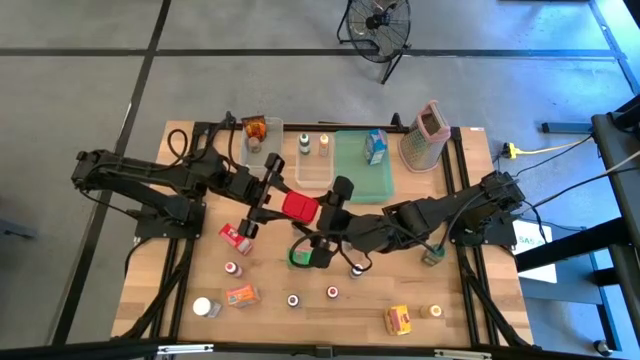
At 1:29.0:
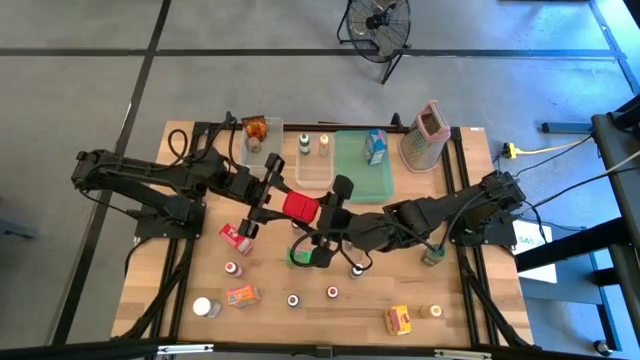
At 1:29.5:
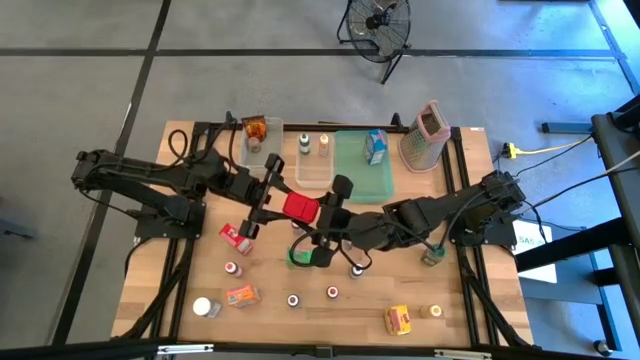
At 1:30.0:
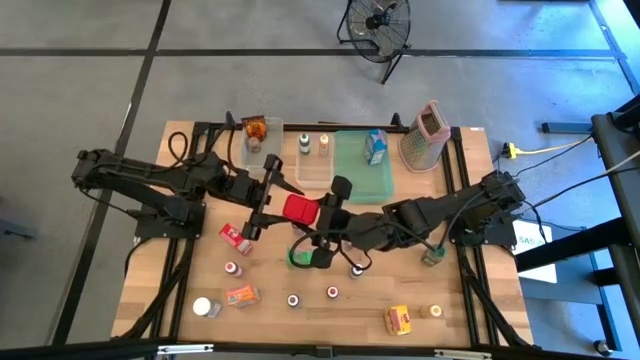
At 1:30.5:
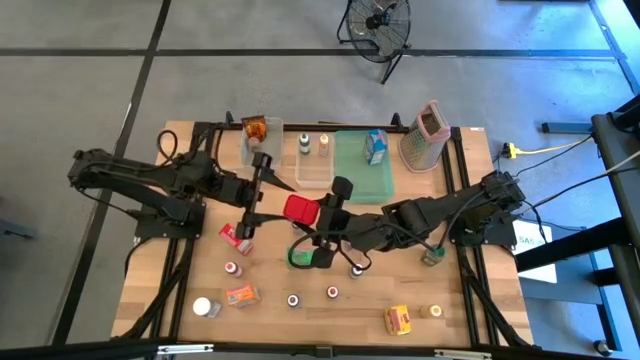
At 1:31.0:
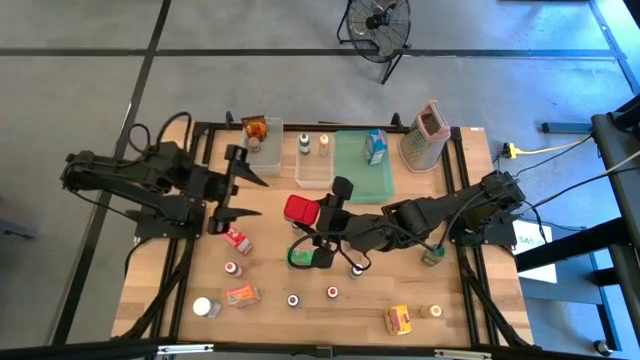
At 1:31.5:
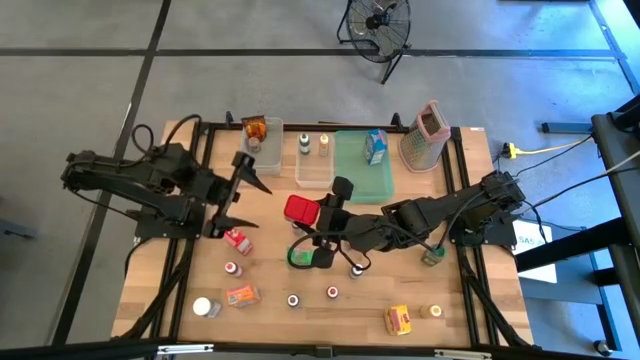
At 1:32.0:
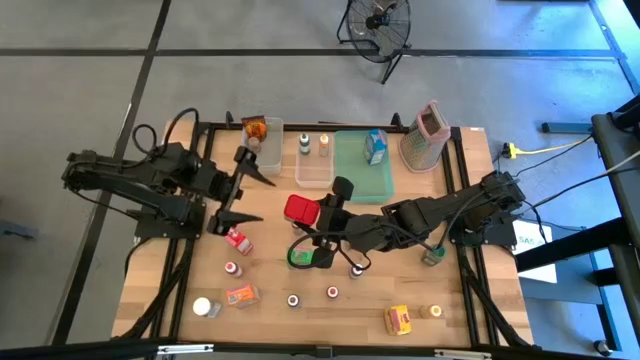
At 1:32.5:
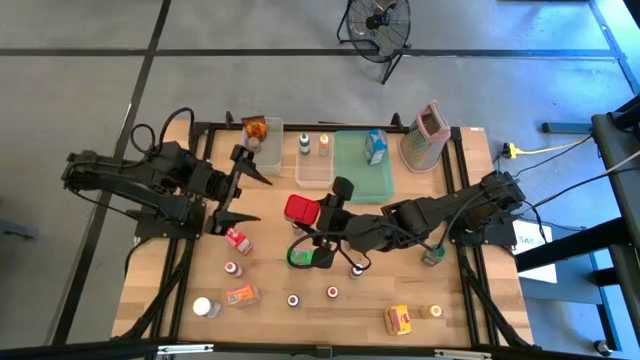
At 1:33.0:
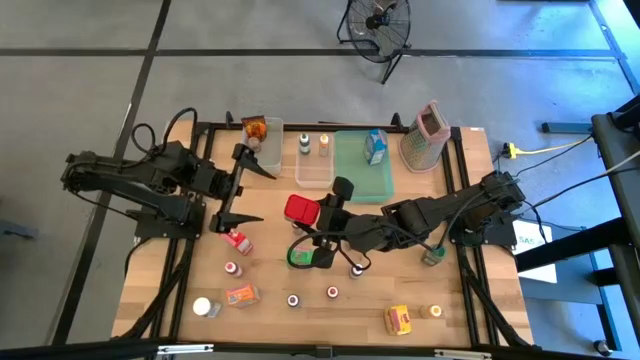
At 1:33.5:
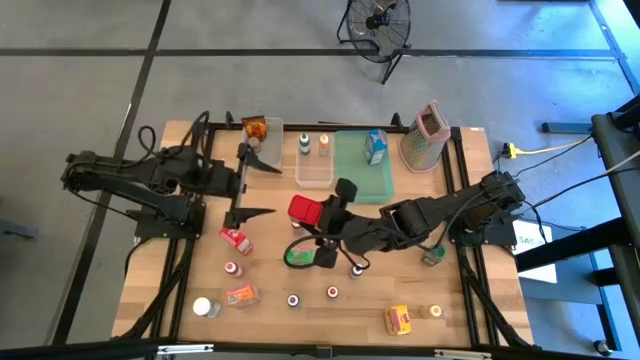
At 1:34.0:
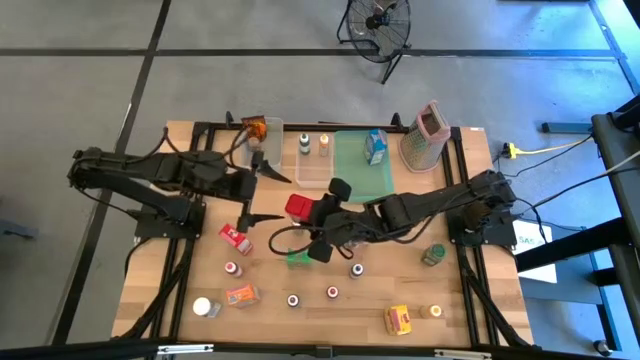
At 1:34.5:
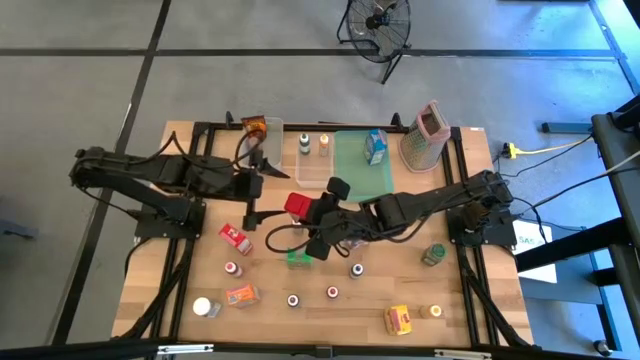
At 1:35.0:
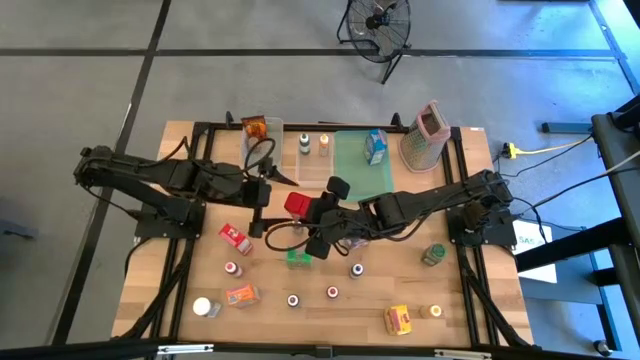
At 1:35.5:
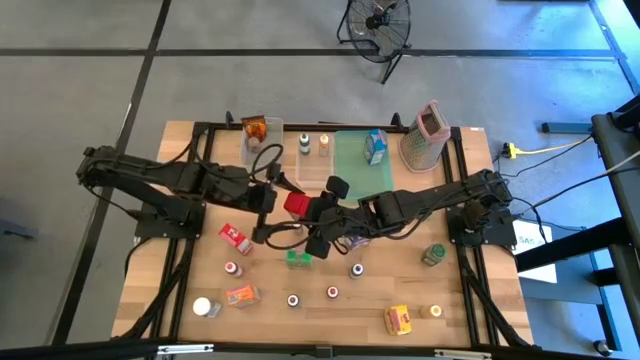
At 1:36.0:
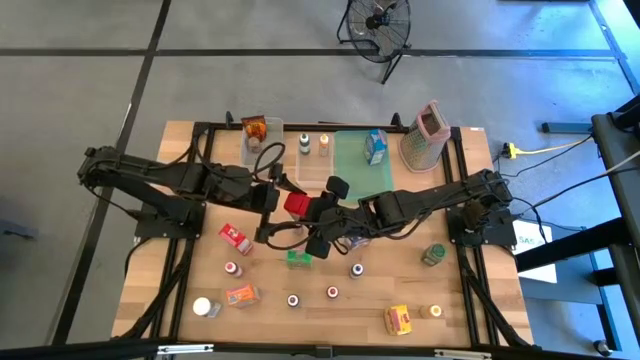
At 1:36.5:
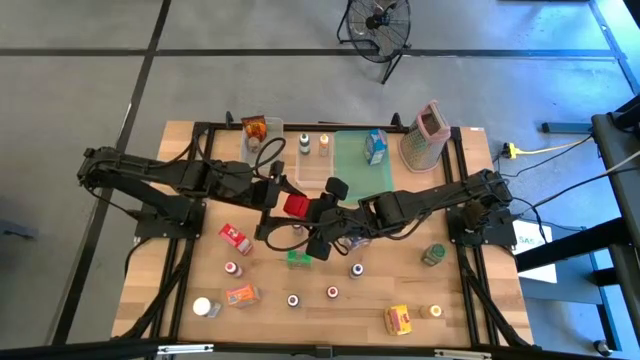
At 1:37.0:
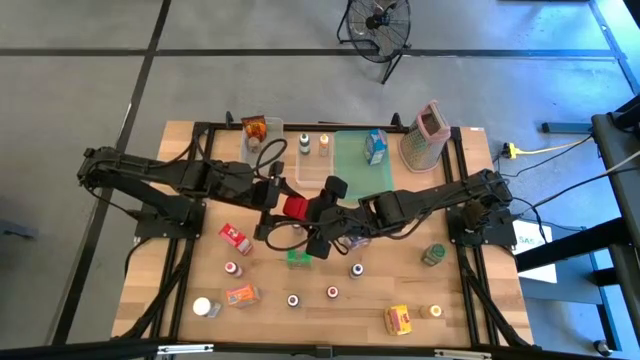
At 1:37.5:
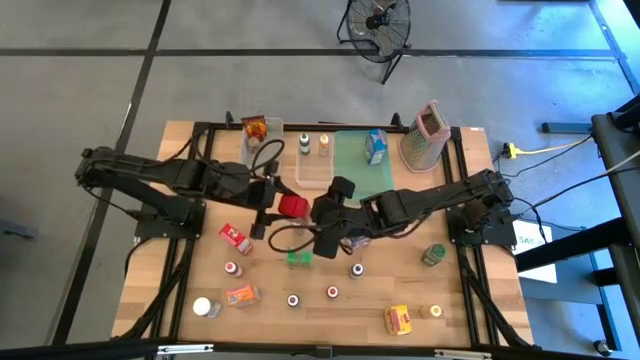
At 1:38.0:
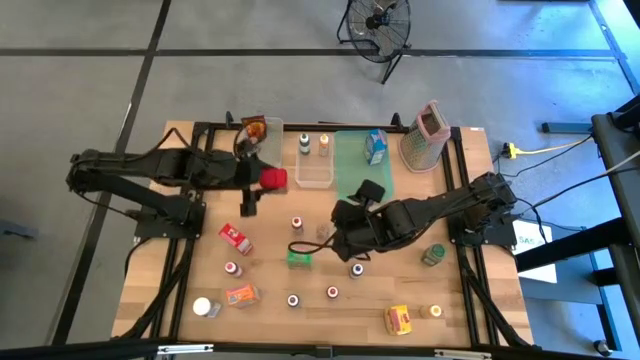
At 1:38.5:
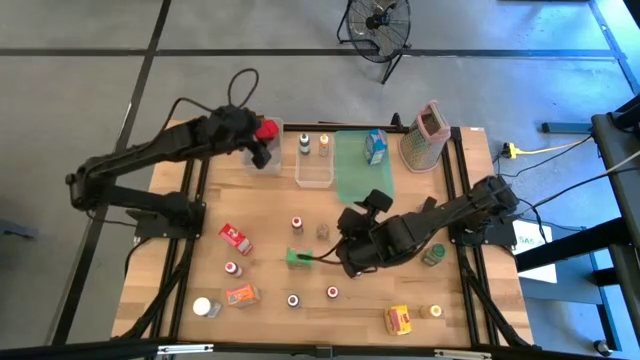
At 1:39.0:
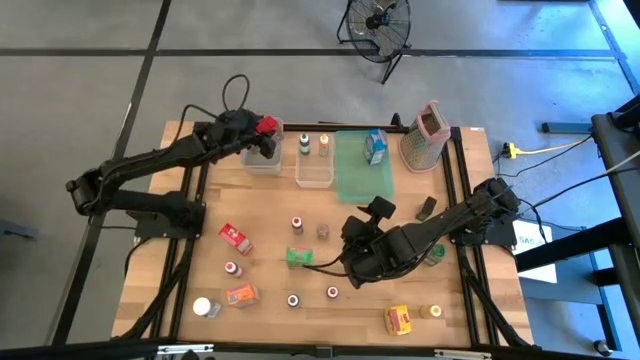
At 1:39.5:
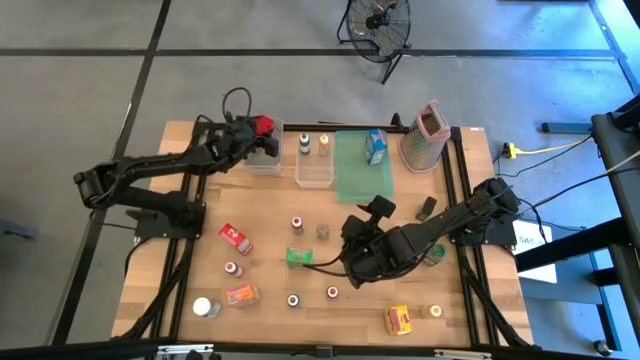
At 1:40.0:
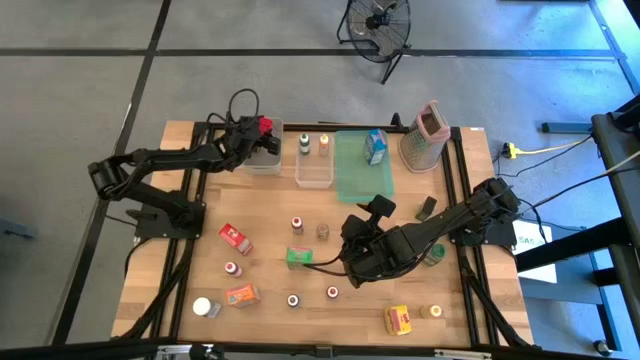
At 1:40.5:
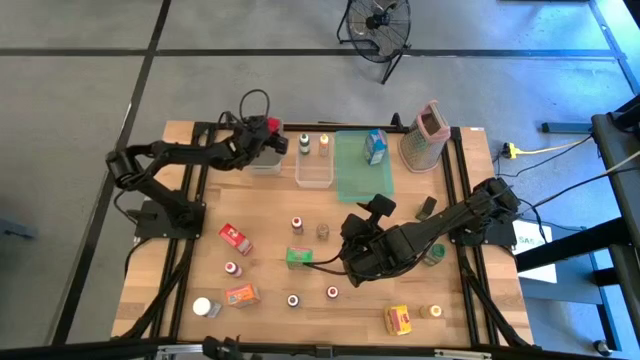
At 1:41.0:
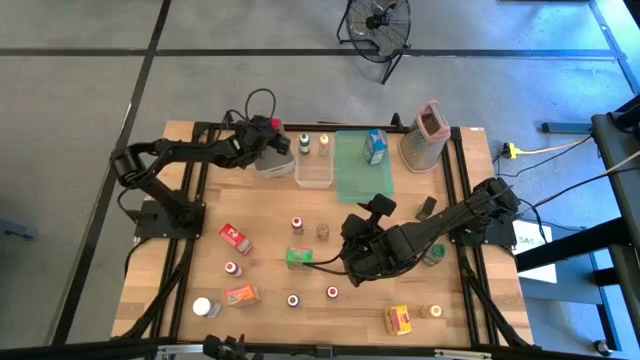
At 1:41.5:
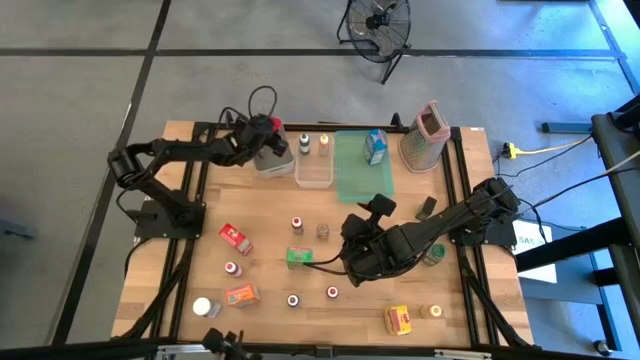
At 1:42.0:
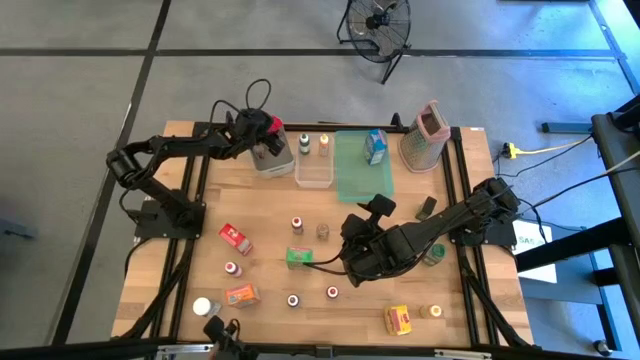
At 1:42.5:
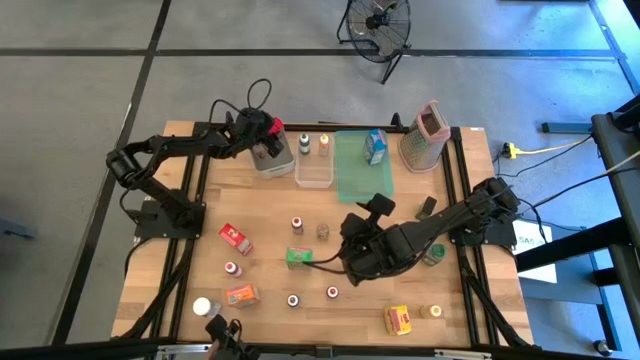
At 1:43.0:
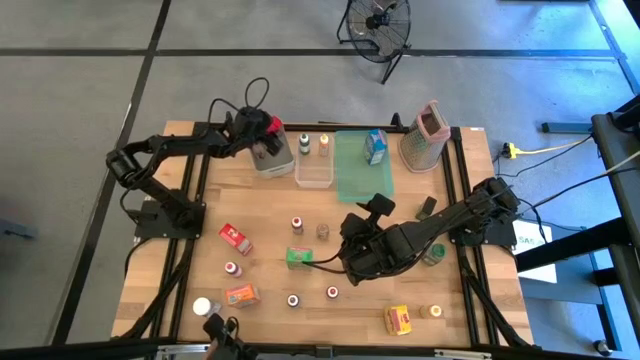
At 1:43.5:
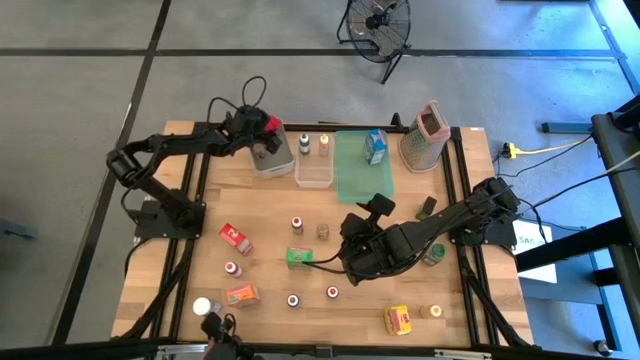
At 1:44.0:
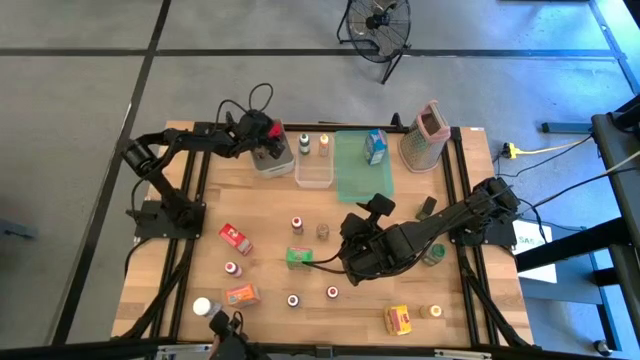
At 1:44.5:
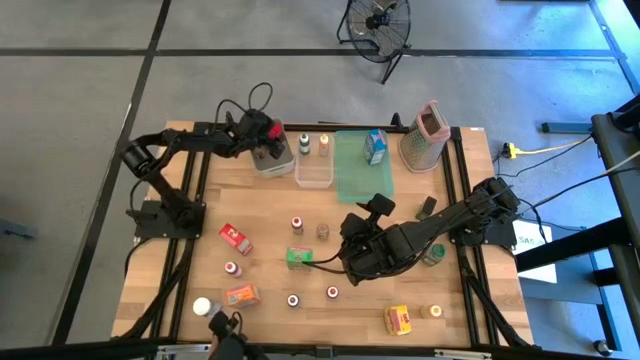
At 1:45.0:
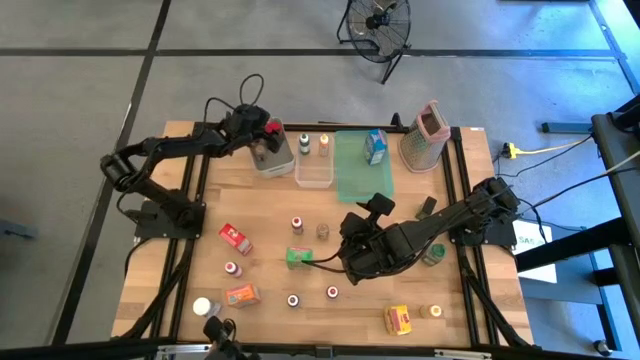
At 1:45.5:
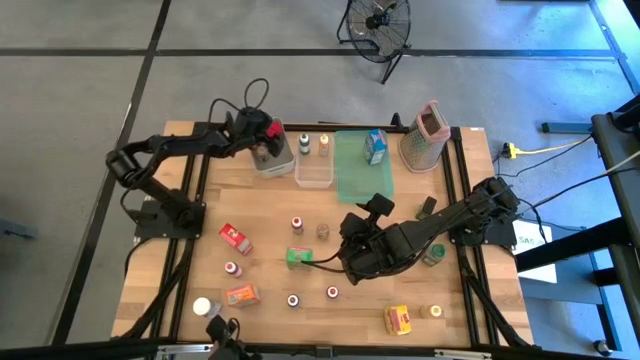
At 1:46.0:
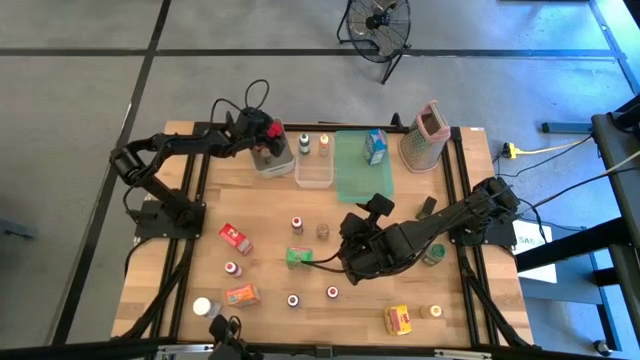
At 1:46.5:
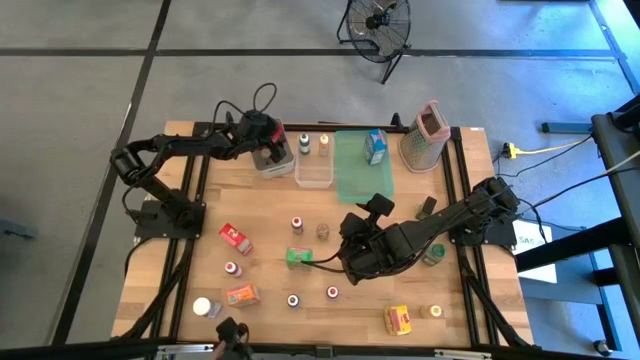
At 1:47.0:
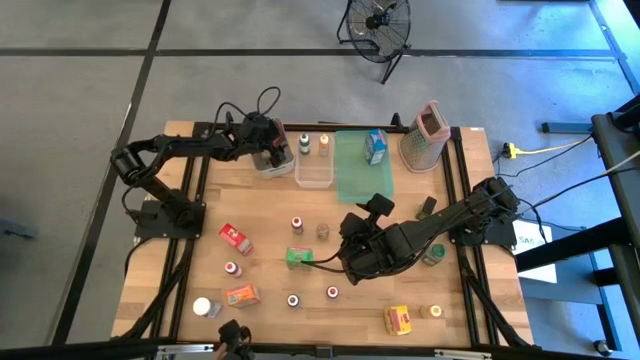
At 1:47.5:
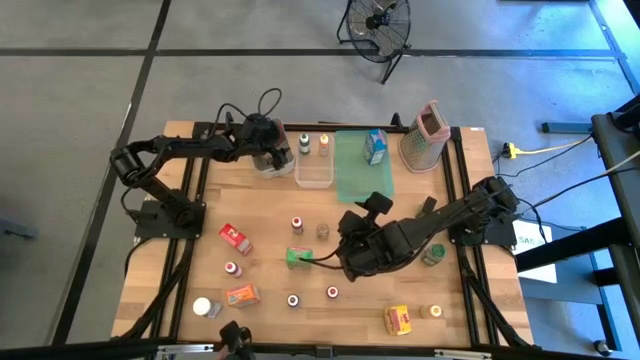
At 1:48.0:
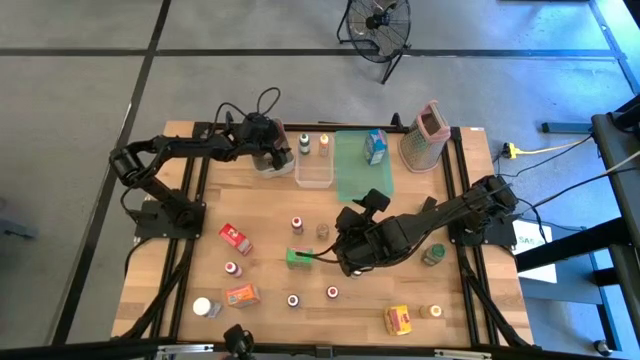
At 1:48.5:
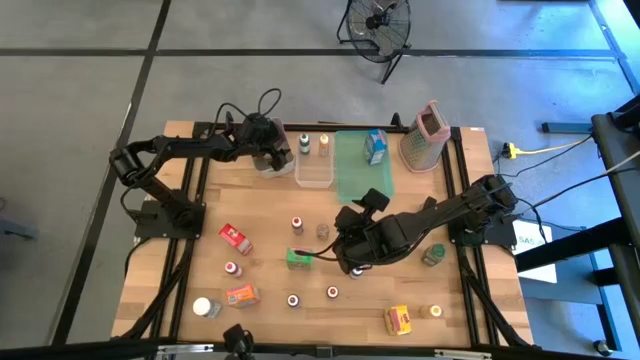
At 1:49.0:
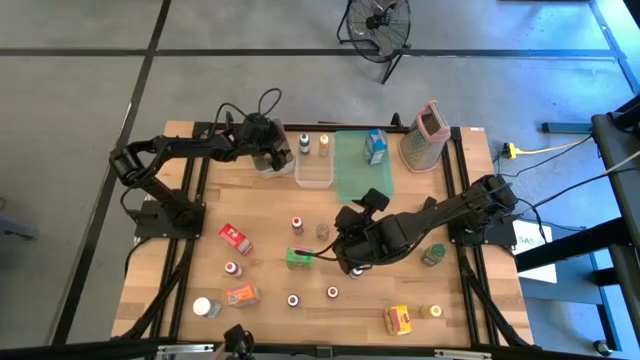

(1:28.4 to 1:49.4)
Task: Pick & Place Kitchen Items
Put the red seasoning can into the gray bin
